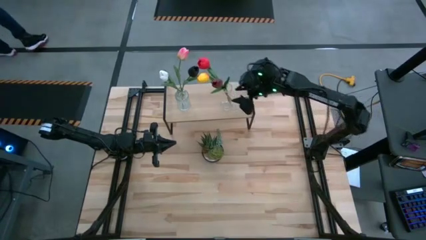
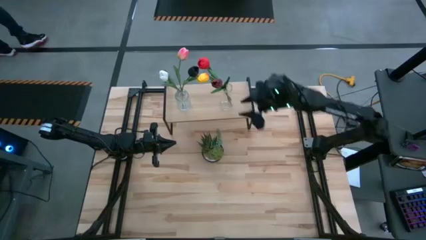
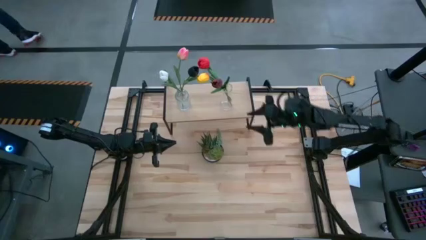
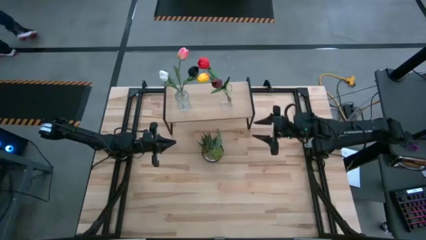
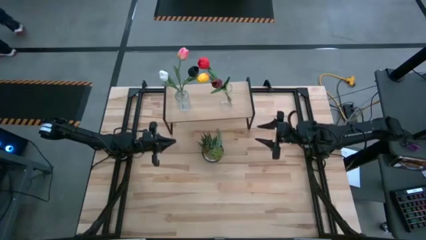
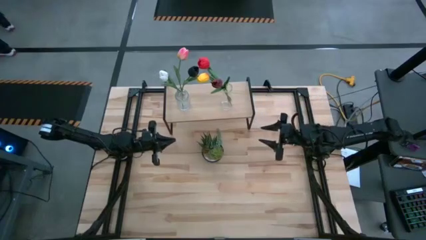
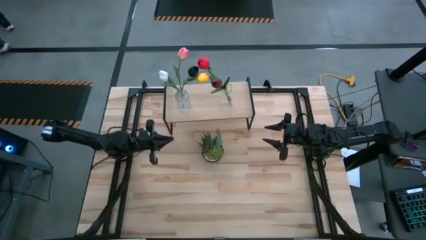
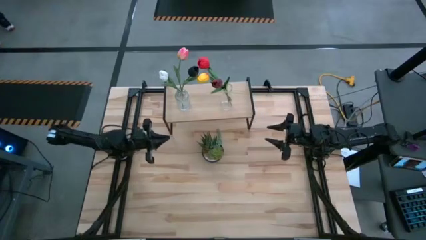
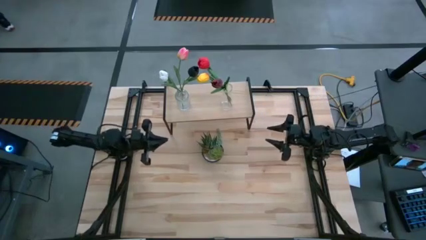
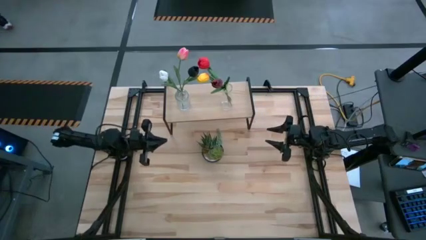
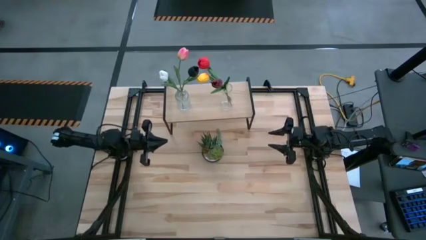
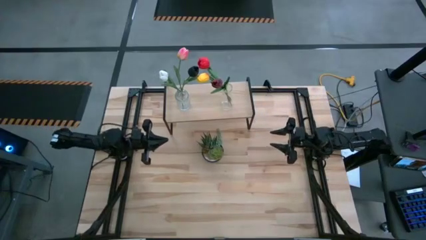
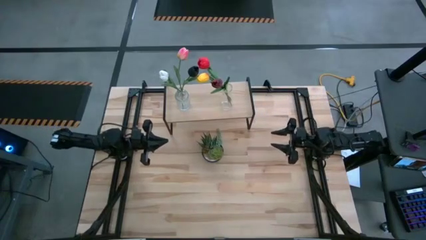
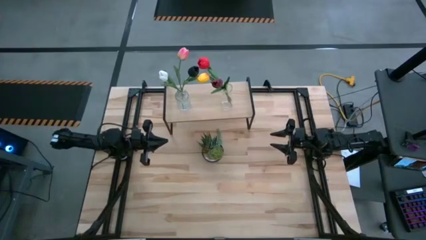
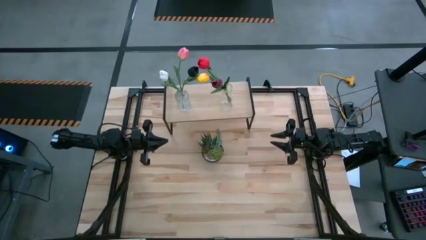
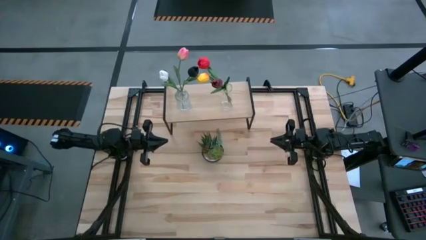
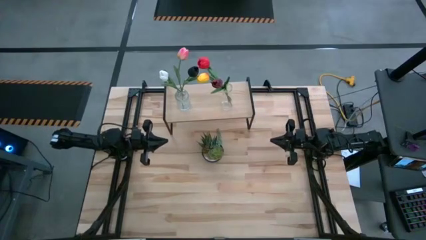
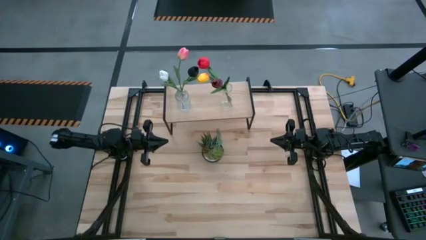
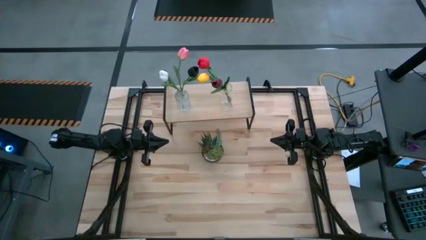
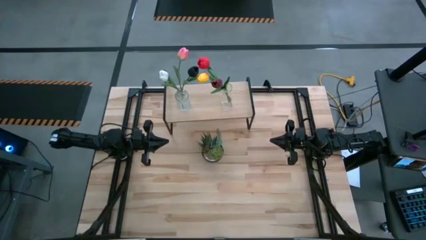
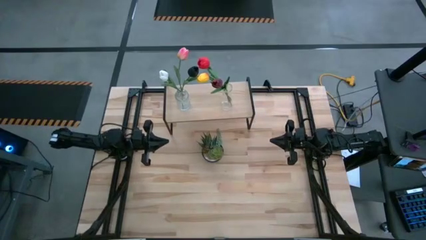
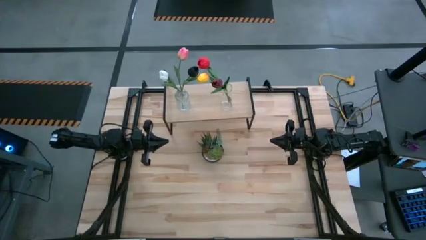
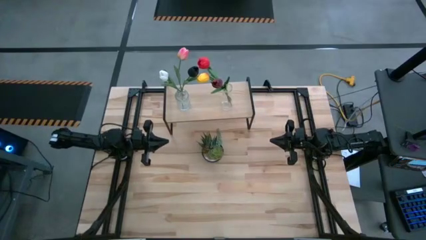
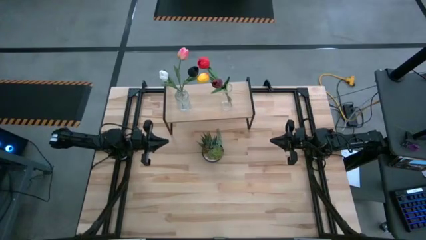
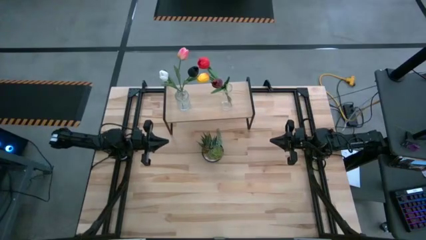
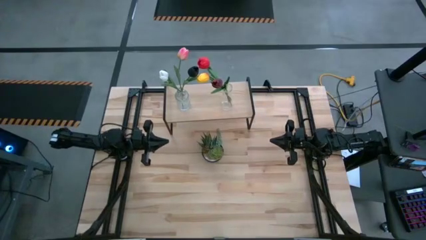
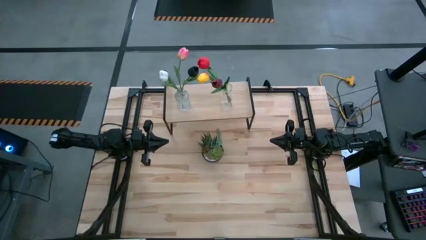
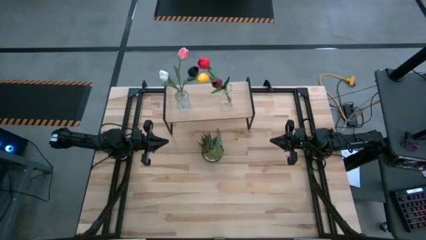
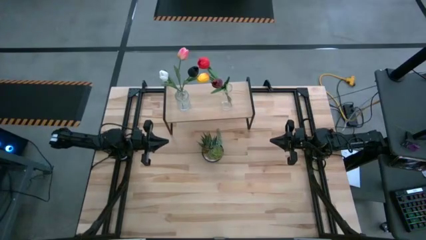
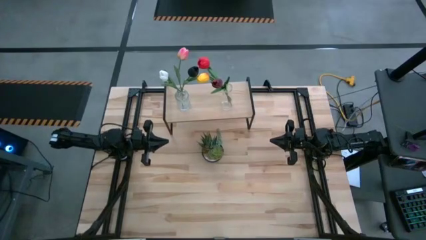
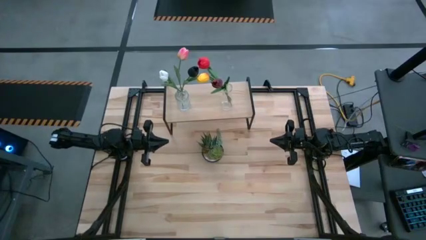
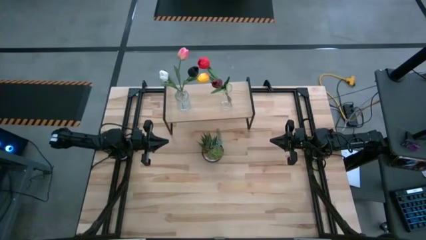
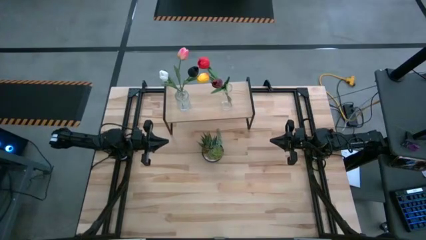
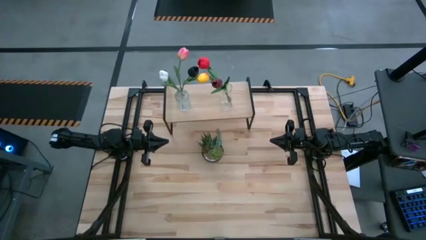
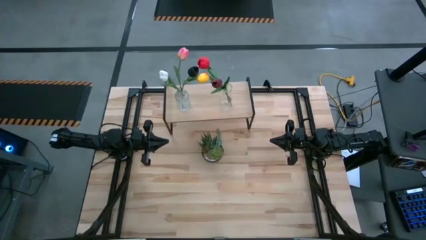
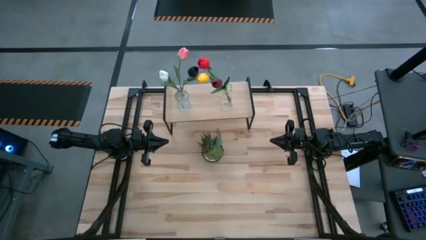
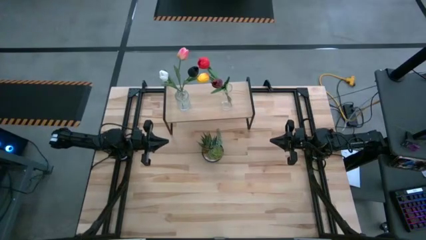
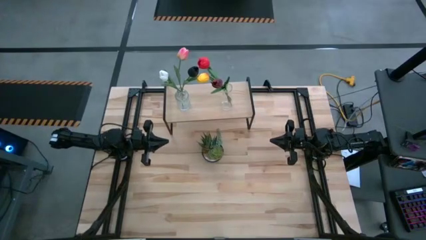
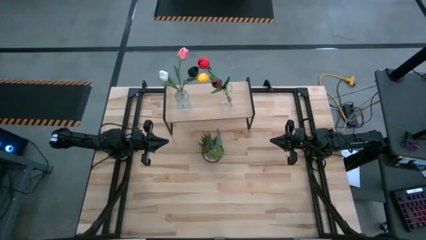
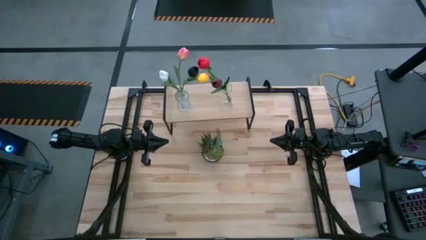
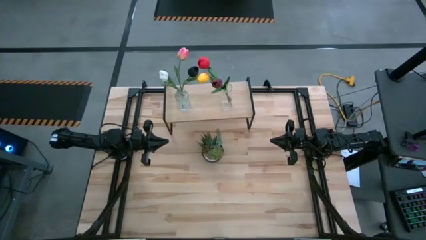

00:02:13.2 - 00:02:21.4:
Task: Pick and place flowers into a vace then onto a shelf
Return to Home Position

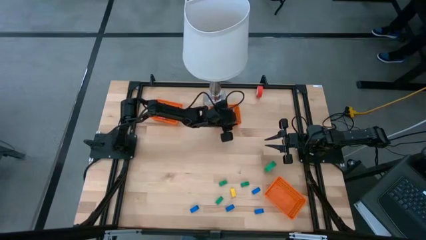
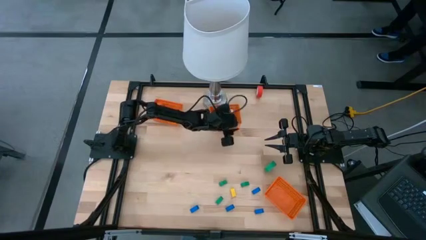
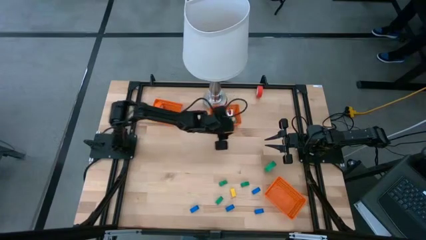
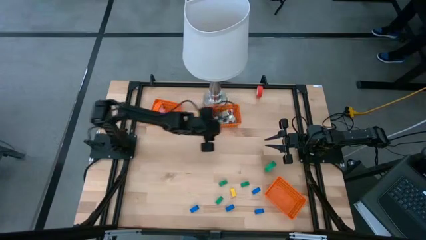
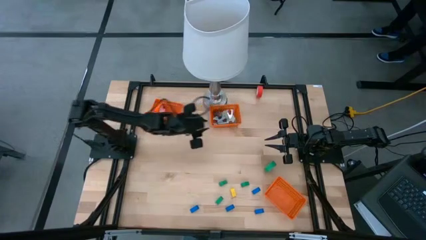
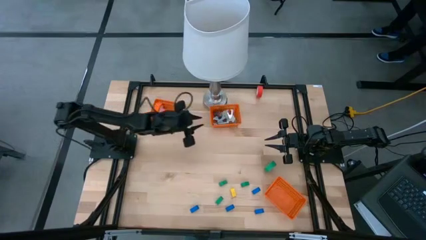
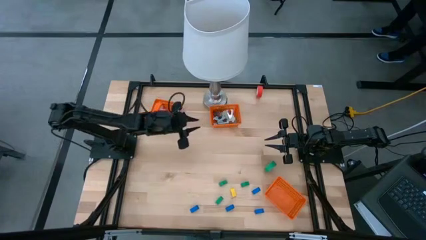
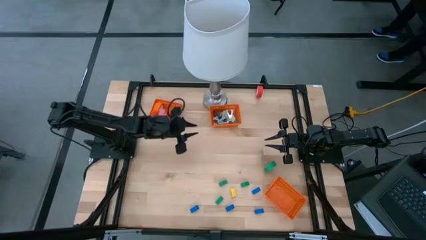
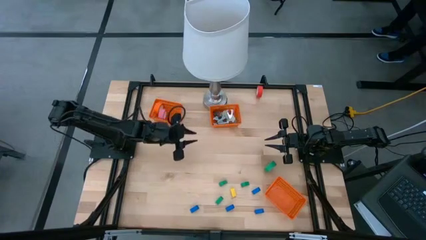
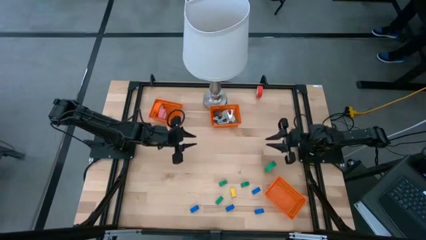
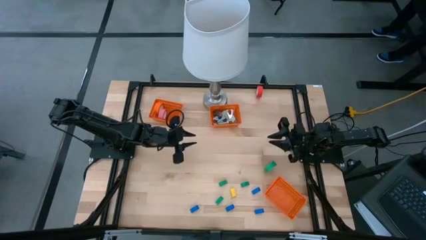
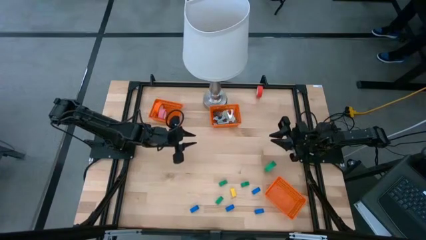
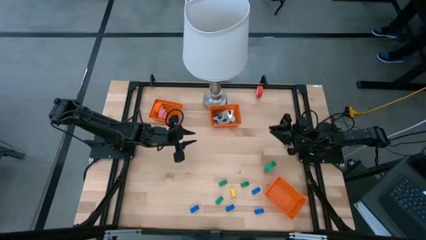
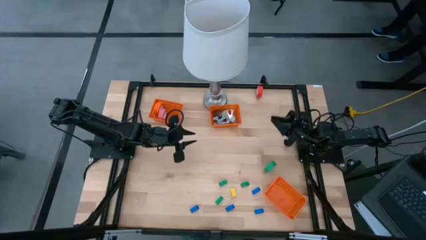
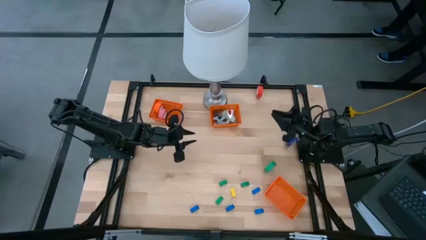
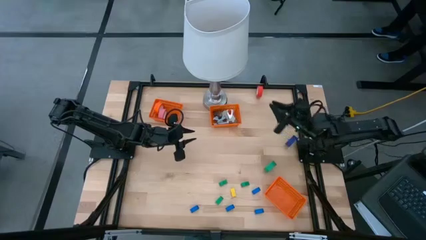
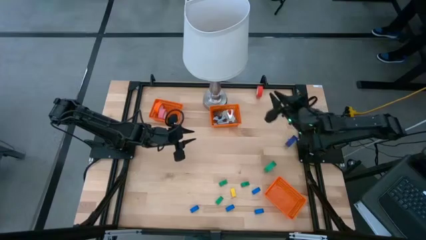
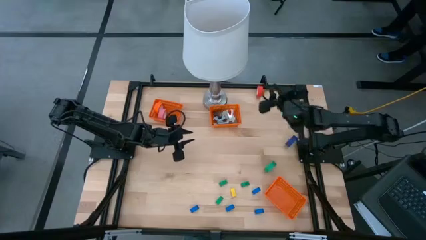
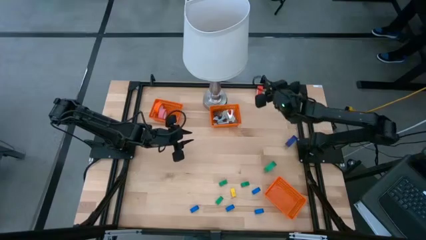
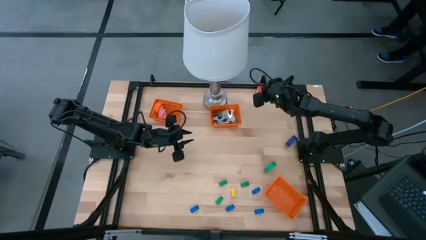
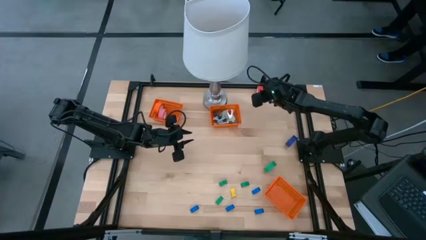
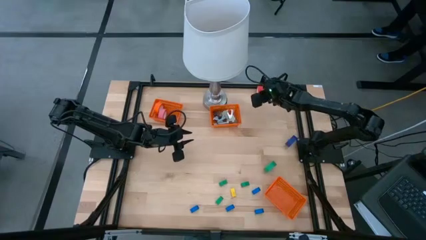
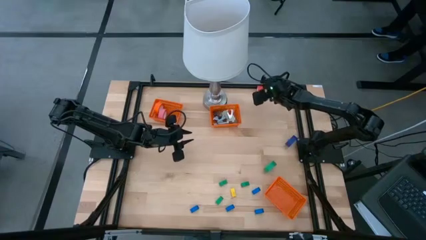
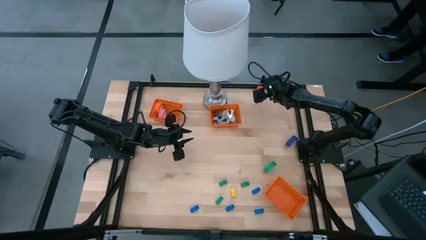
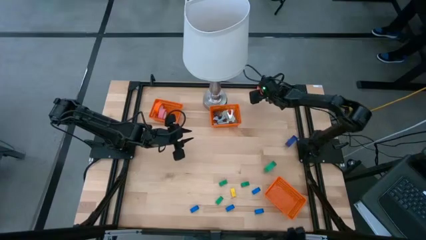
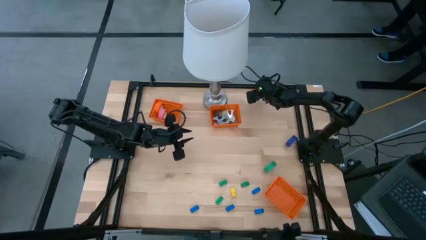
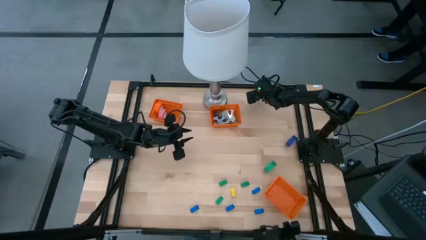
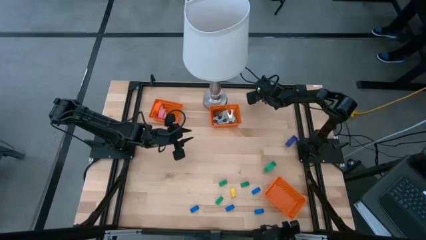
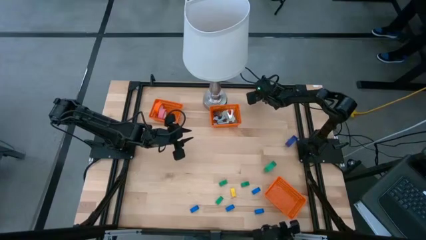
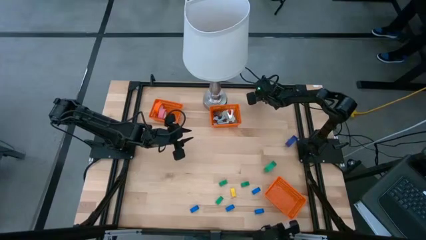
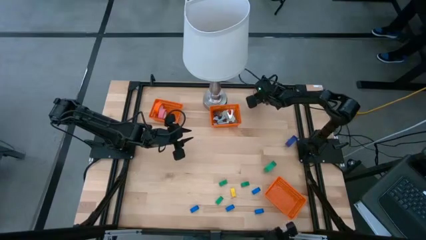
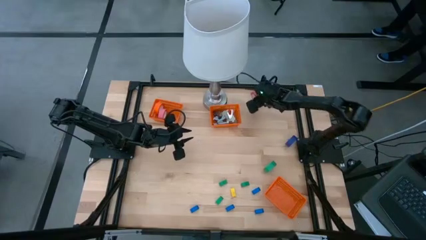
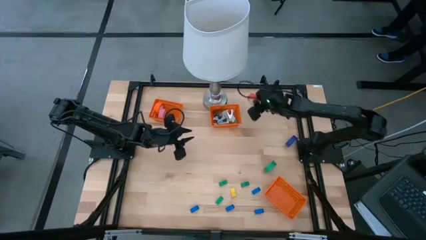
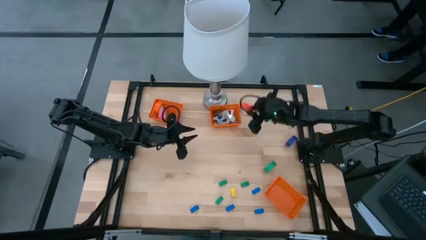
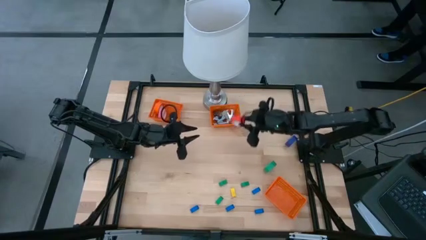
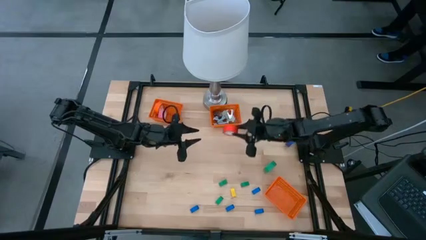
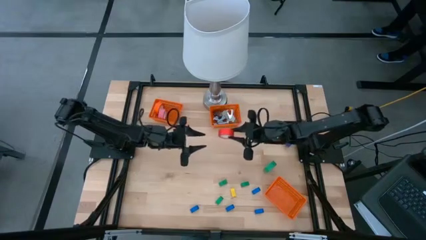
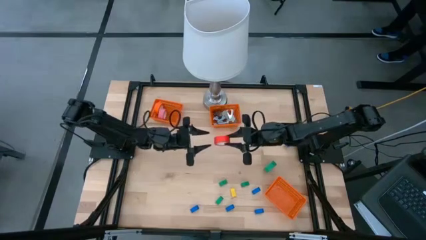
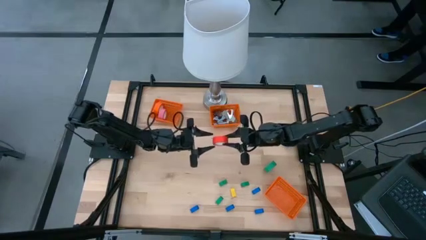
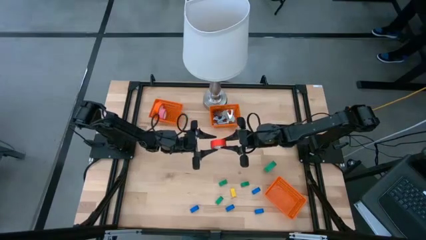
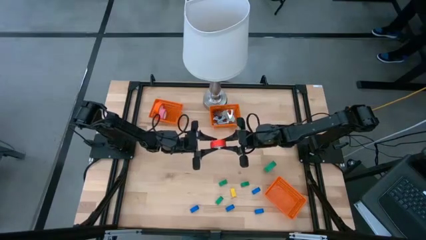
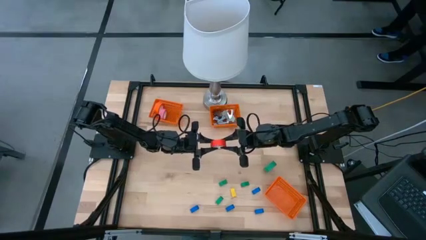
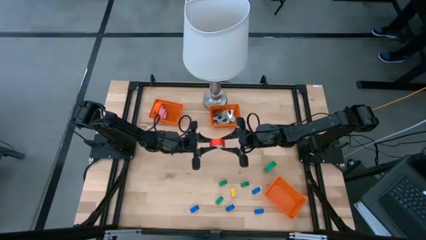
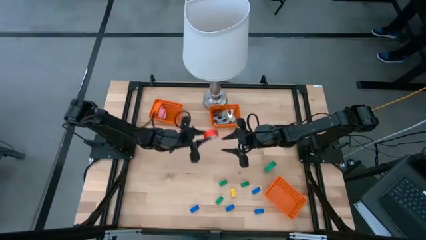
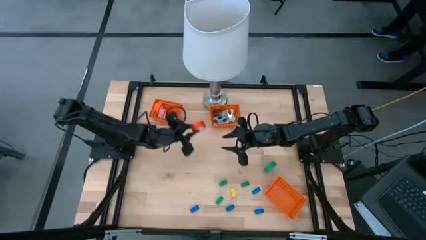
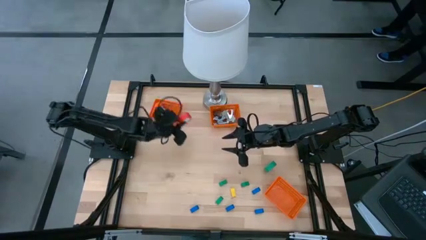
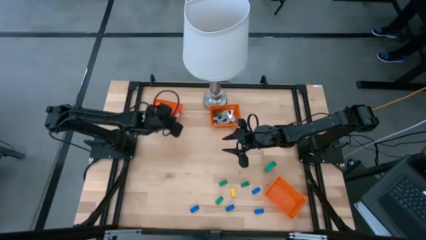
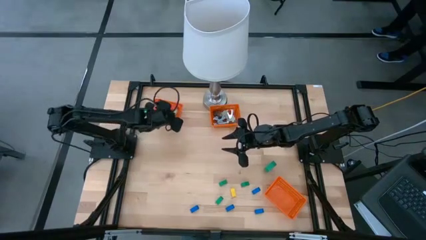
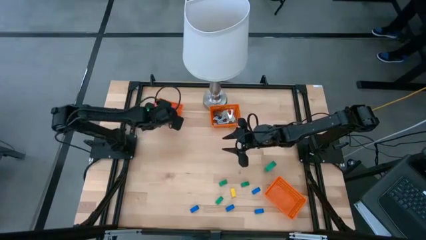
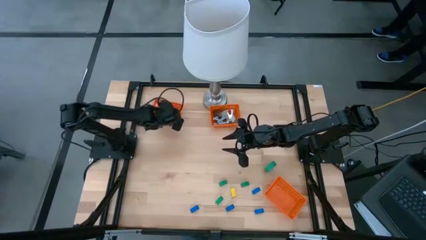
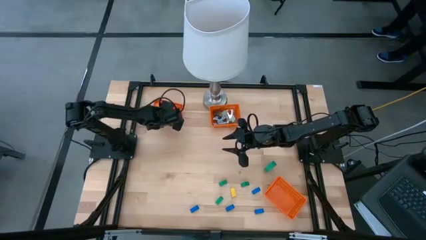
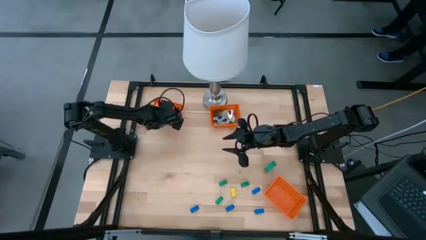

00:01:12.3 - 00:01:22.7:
Task: Pick and place Stapler, Stapler remover, tape
Put the orange tape into the top left orange bin
